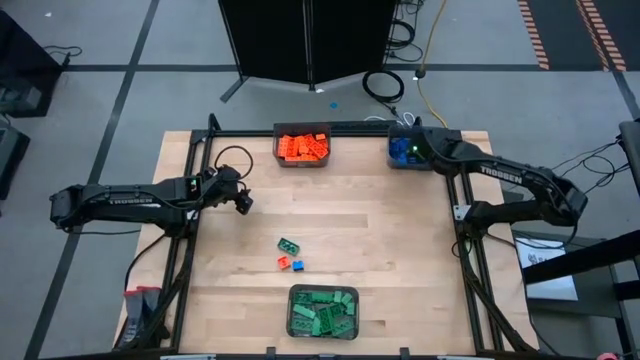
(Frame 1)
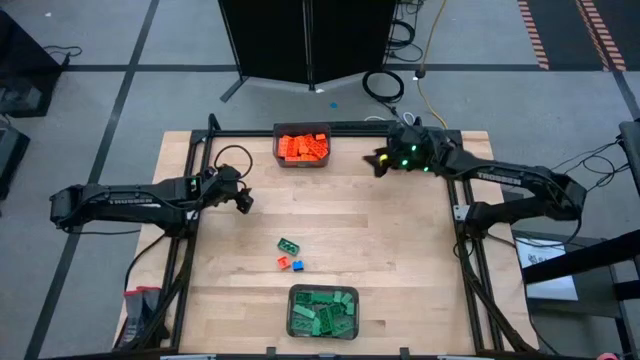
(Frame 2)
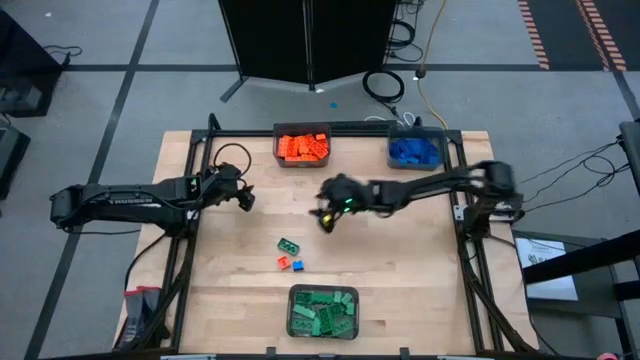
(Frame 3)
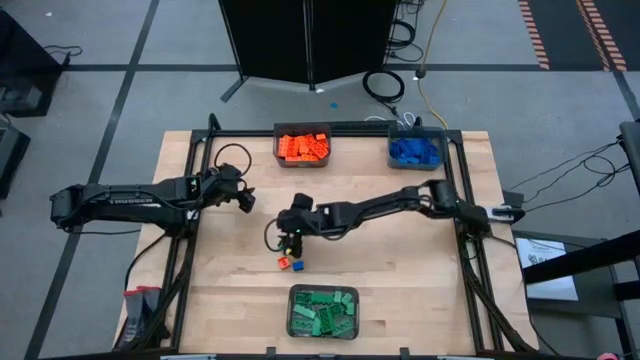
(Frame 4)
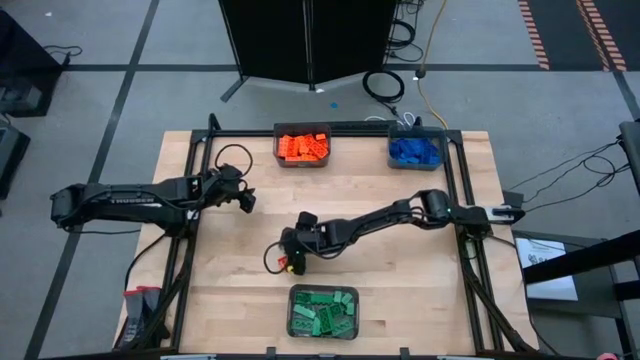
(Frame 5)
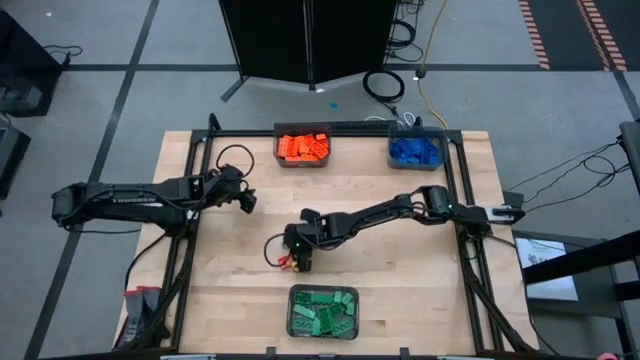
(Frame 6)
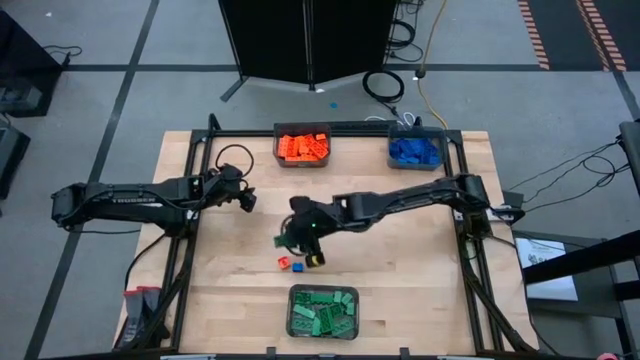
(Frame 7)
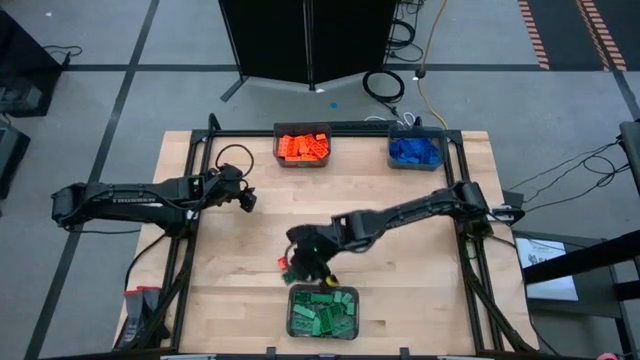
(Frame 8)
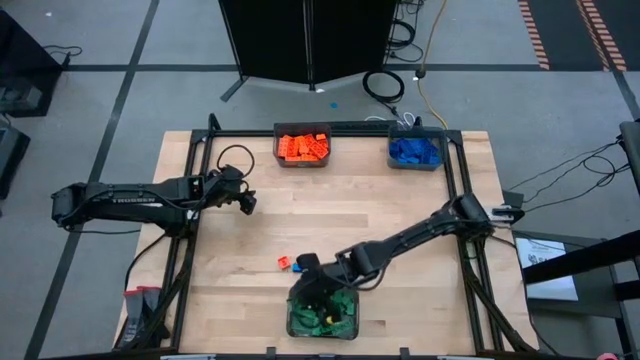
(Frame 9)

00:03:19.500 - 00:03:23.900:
Task: Sort blocks
Put the green game piece into the bottom black bin

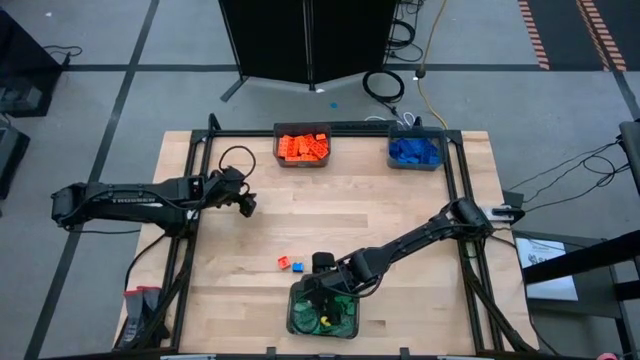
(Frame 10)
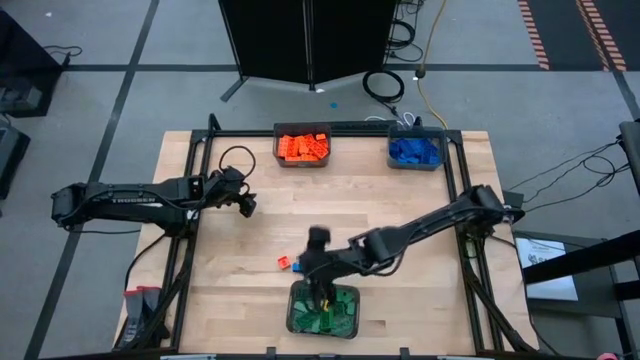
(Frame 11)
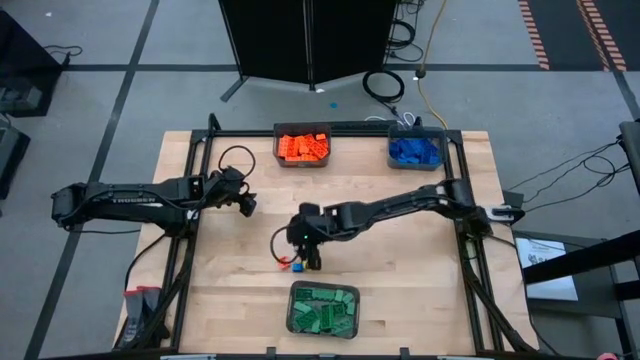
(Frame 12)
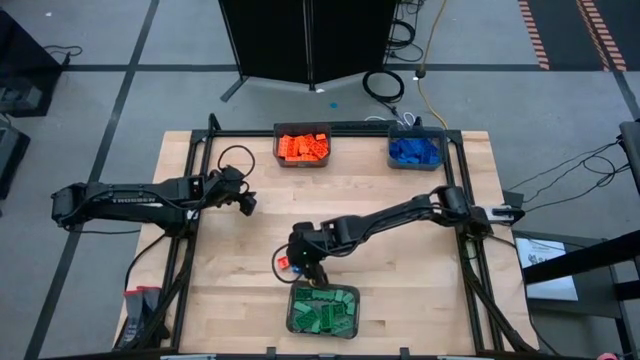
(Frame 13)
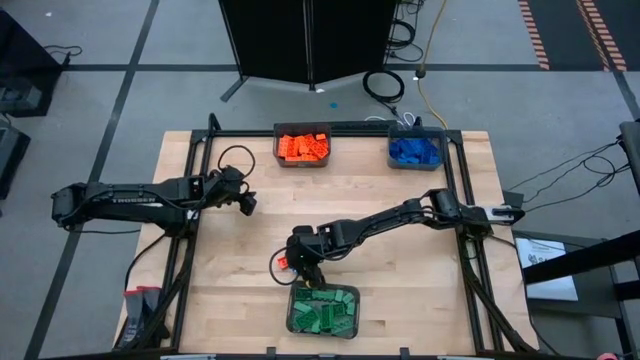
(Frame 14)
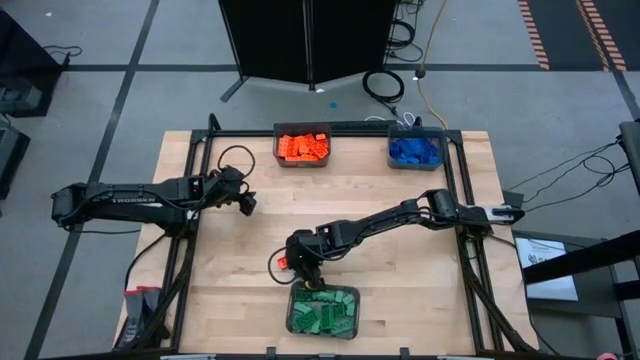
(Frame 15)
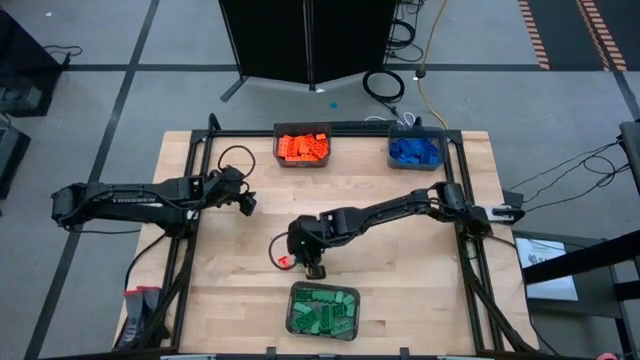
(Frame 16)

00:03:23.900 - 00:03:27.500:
Put the blue game piece into the top right black bin

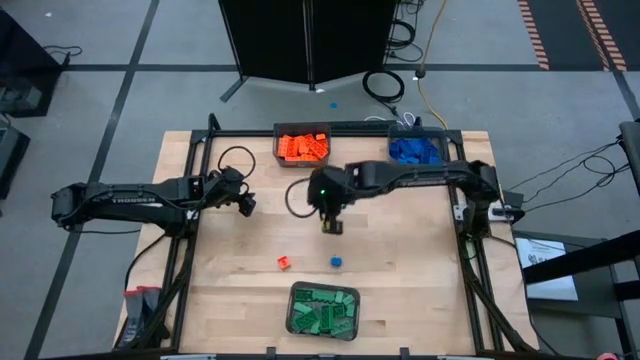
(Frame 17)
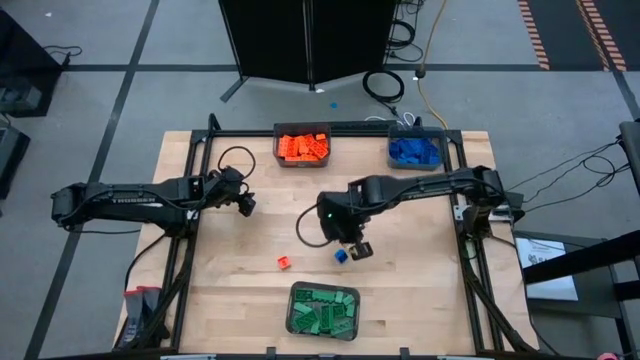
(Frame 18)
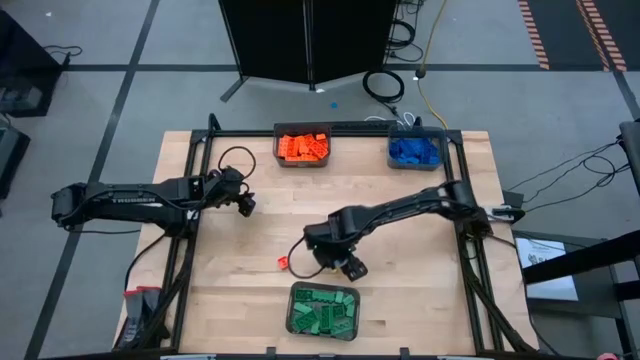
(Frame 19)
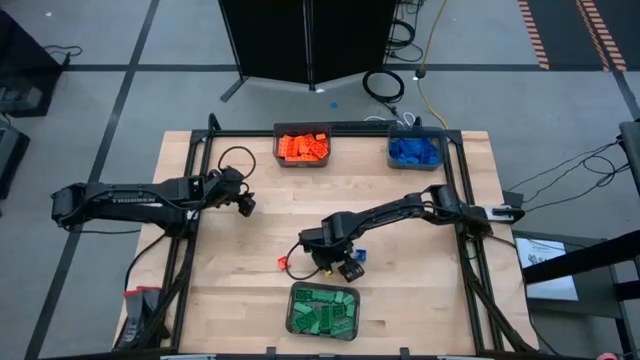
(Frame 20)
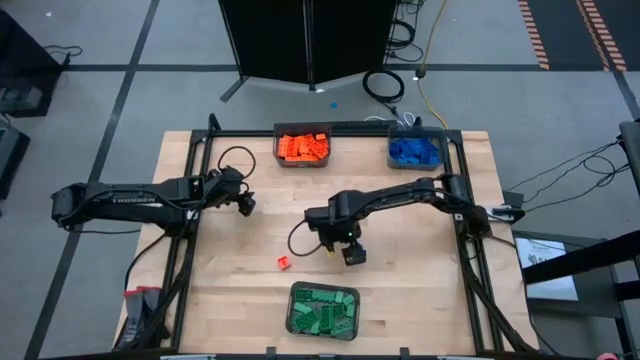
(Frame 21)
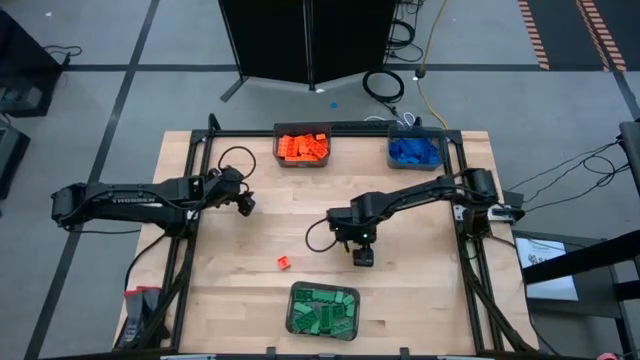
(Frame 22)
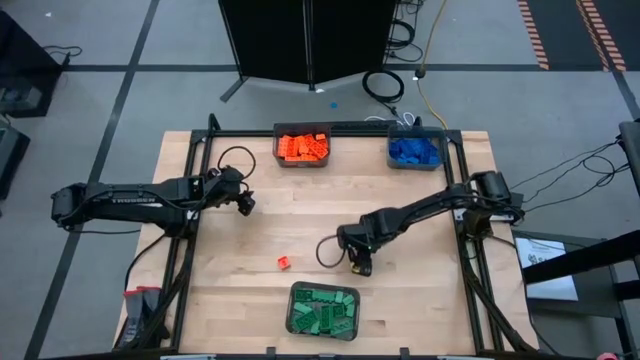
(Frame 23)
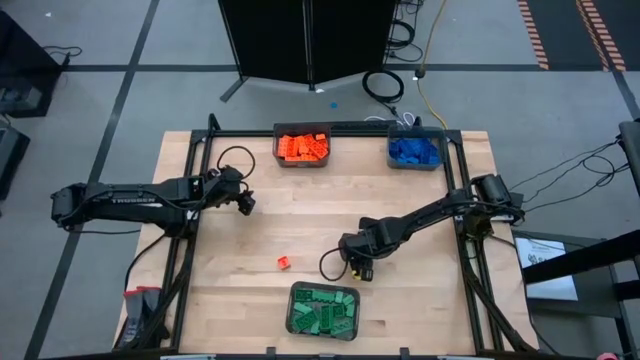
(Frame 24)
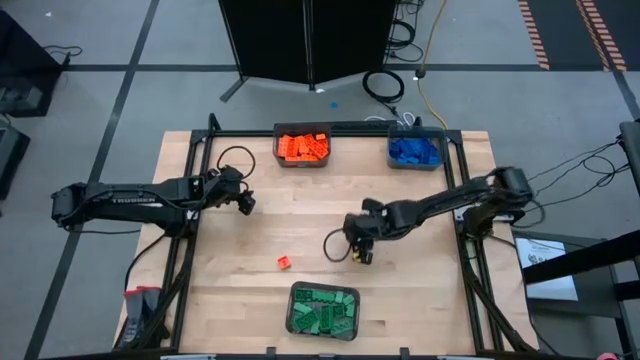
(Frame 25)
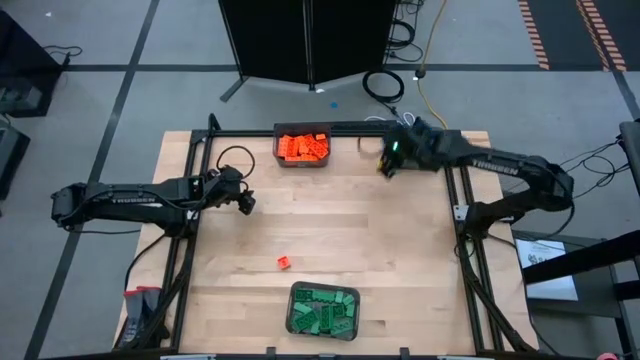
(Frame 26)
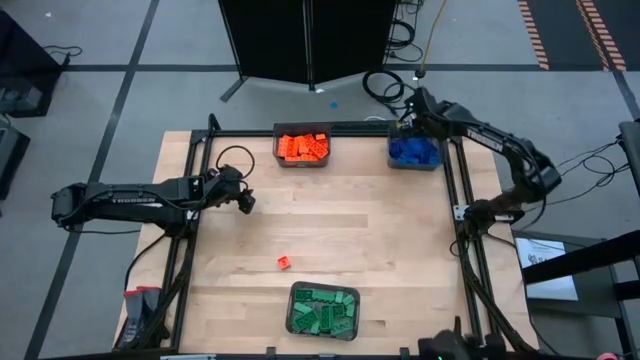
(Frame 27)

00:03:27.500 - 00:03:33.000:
Put the blue game piece into the top right black bin

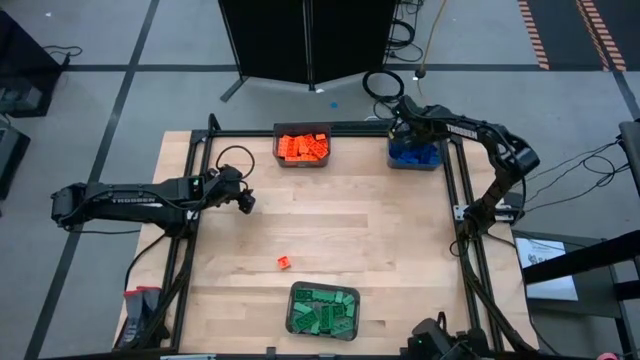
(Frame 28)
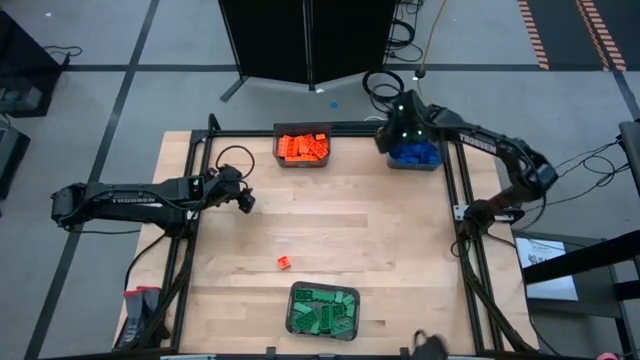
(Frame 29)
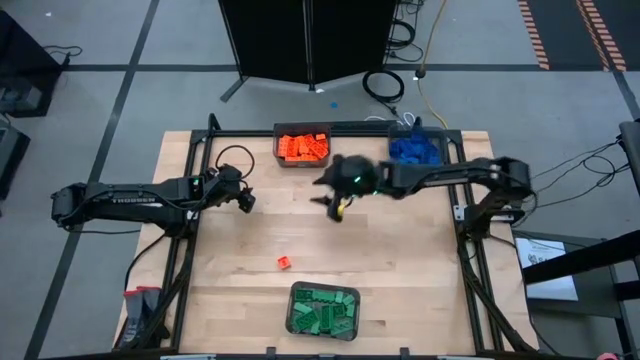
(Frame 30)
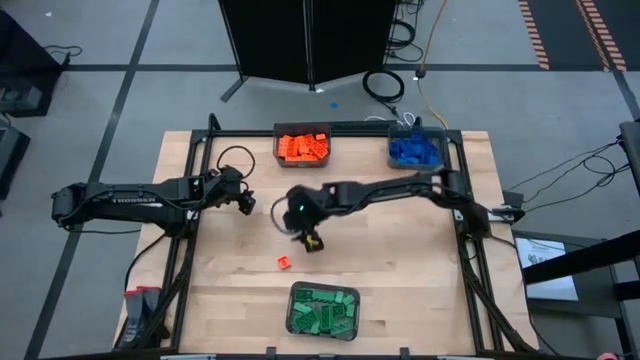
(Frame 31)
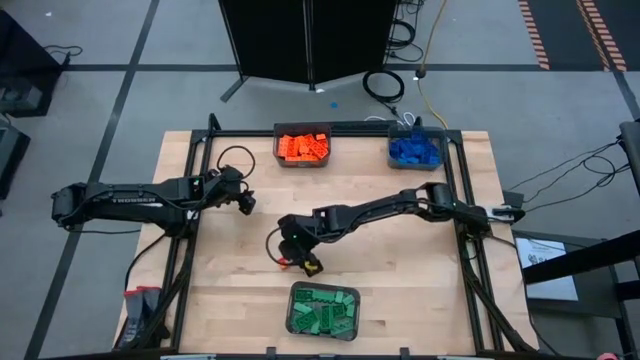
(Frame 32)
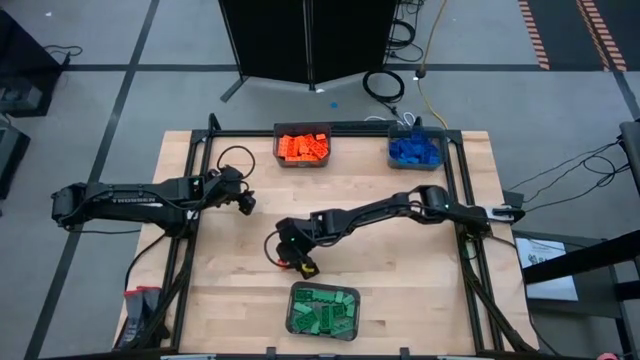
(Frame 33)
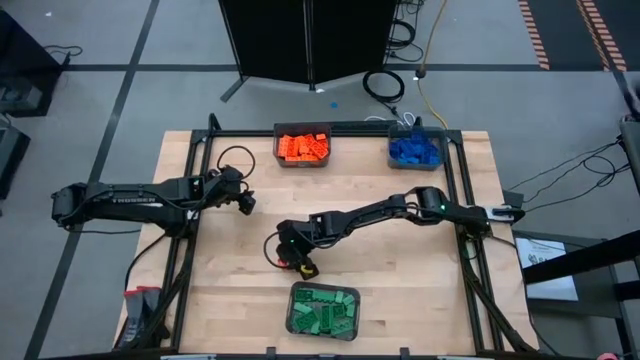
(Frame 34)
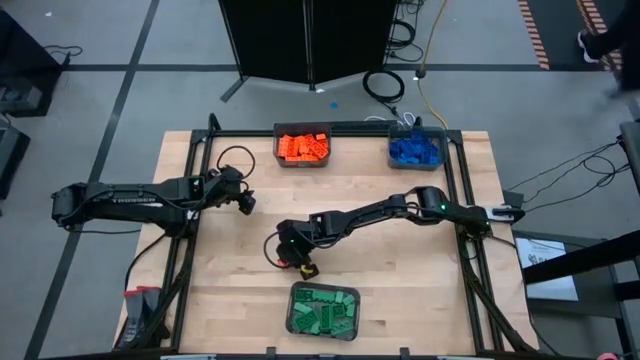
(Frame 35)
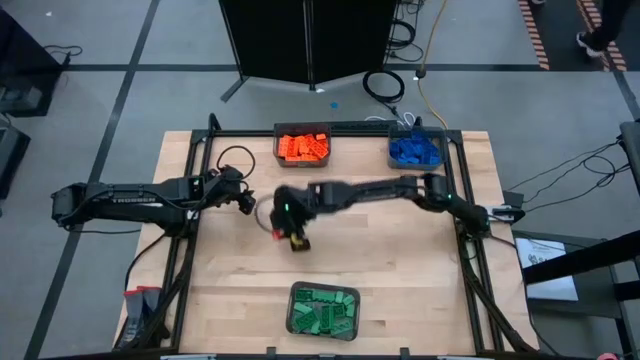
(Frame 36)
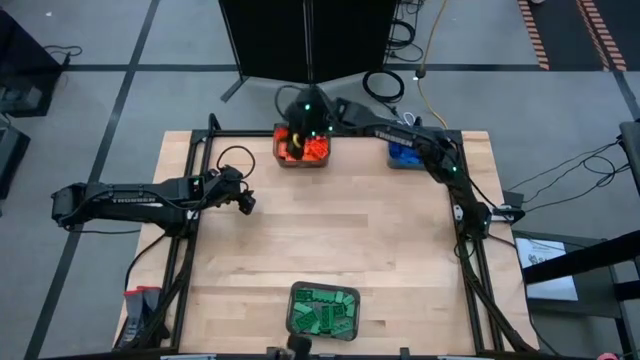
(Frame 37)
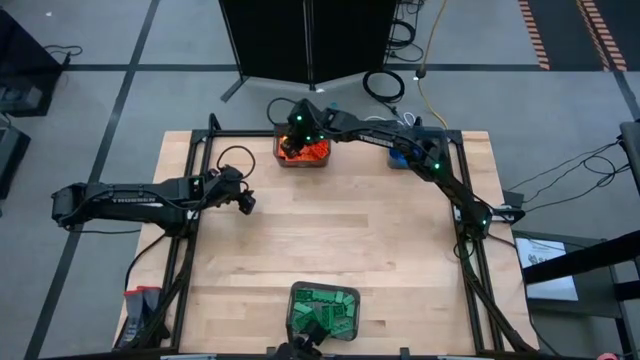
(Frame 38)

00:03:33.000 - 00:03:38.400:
Put the orange game piece into the top left black bin

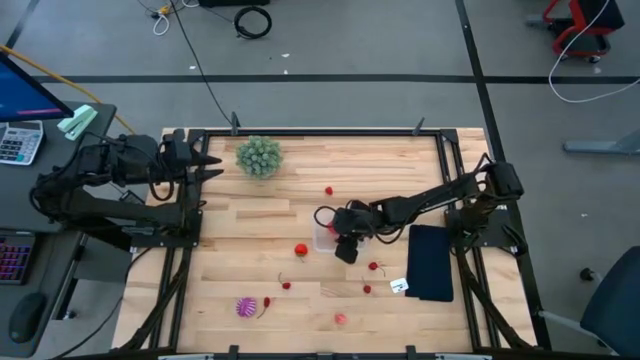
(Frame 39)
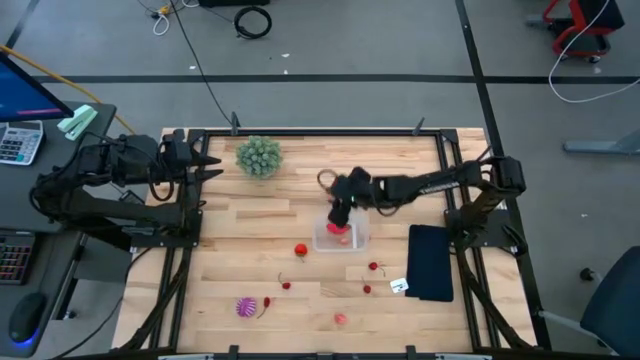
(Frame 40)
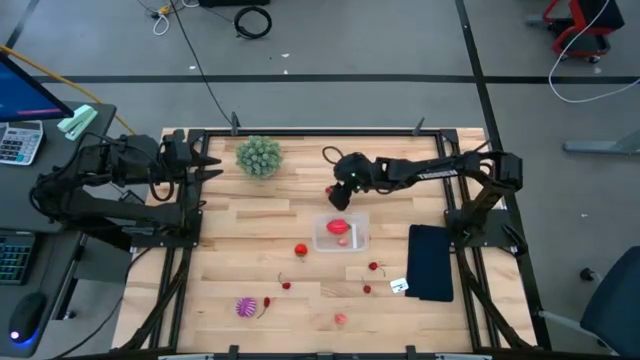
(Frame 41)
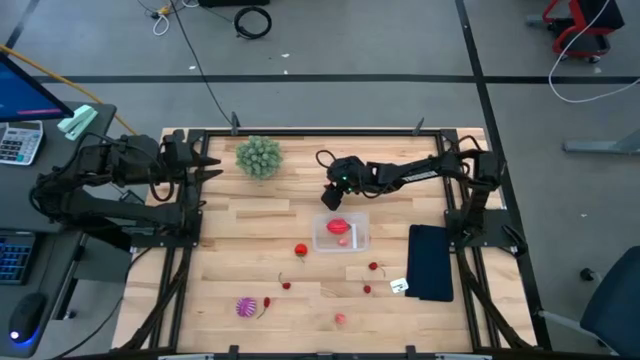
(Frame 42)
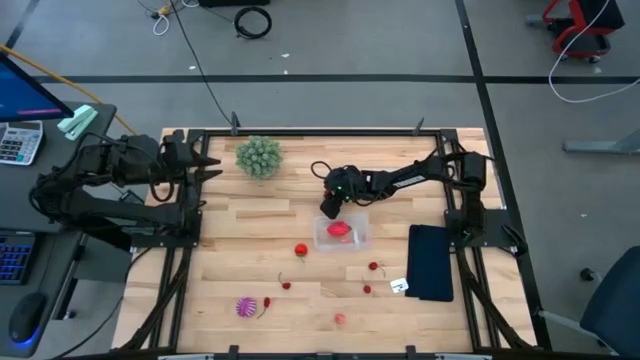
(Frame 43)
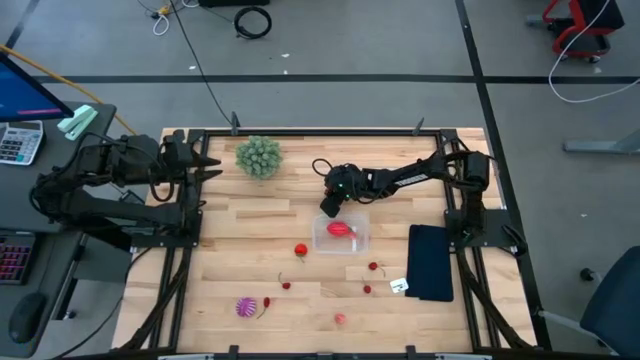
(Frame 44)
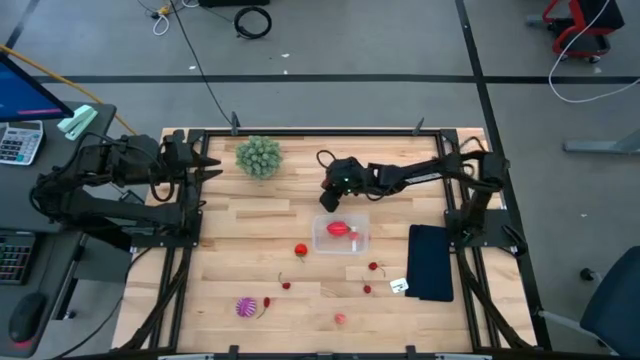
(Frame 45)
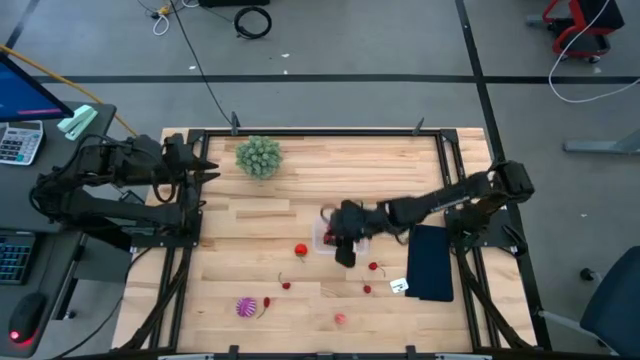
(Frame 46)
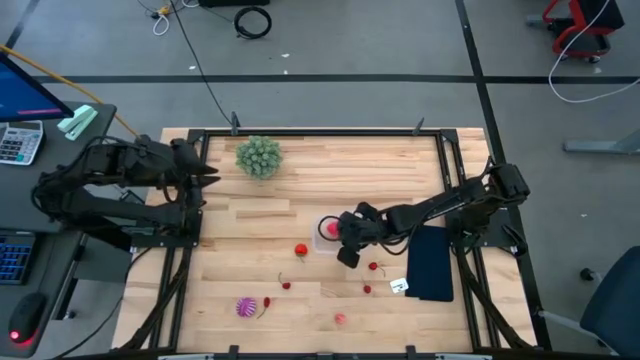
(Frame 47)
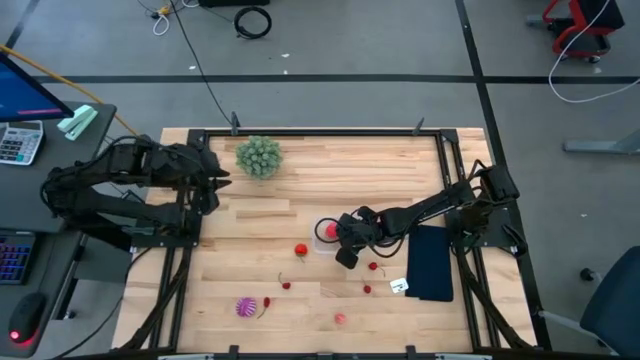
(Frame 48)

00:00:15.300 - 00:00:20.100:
Task: Pick and placing Produce into tupperware
Put the red raspberry into the transparent bin
